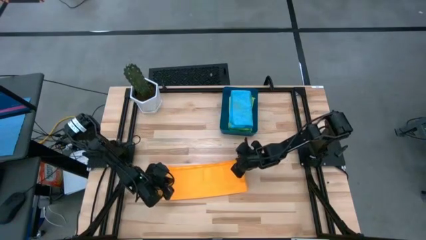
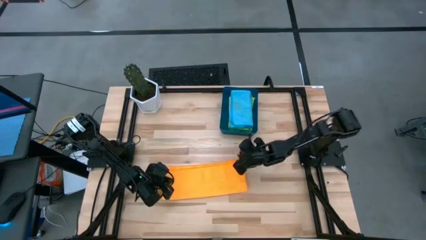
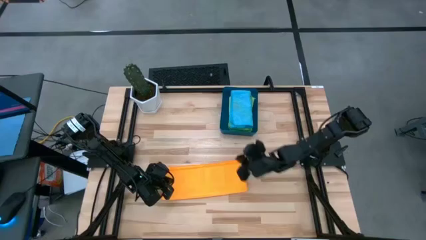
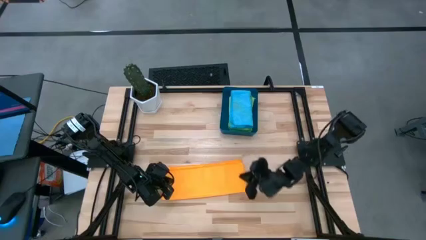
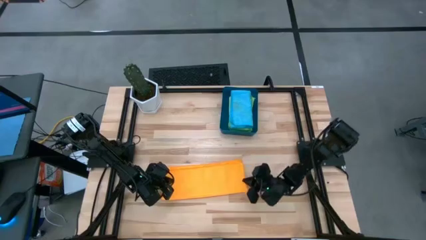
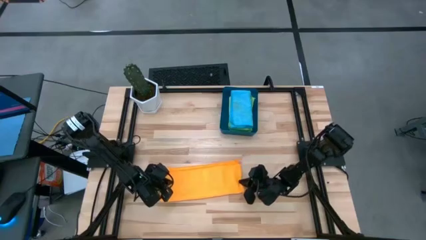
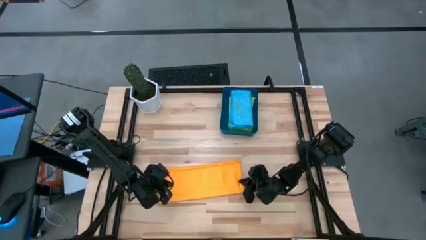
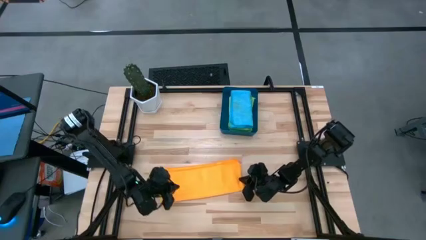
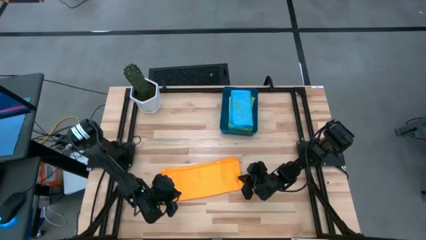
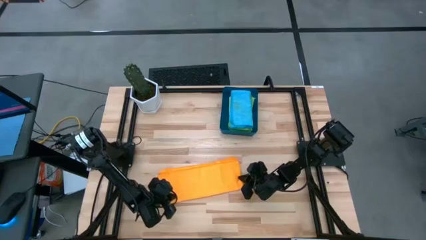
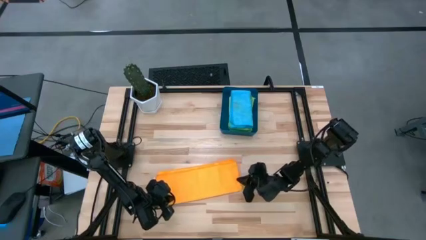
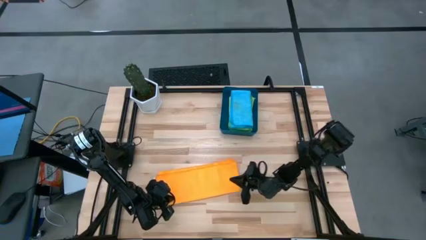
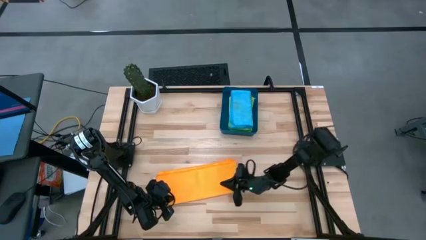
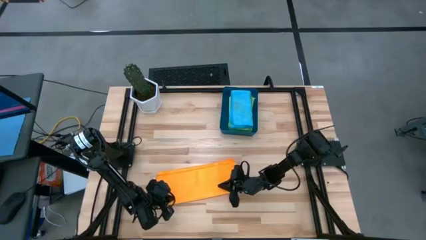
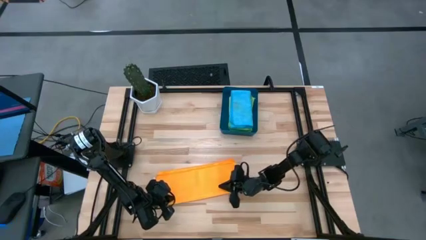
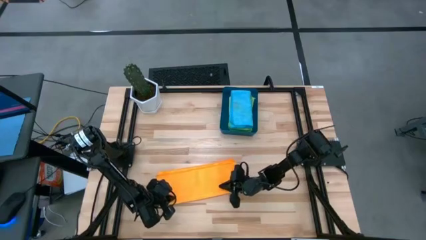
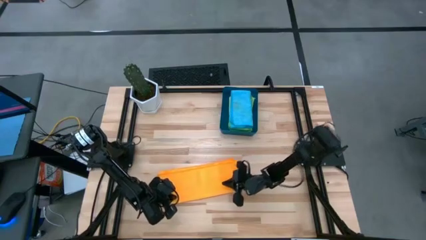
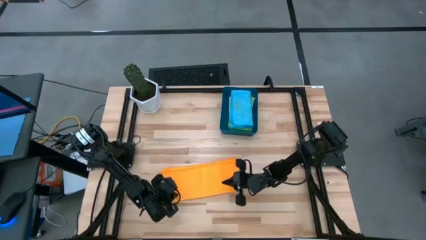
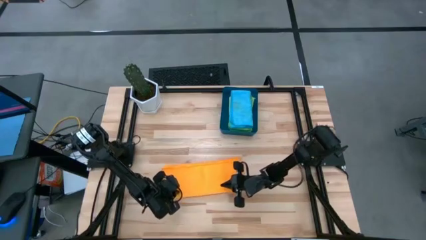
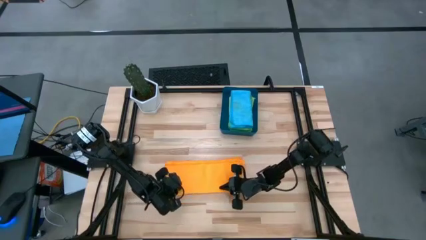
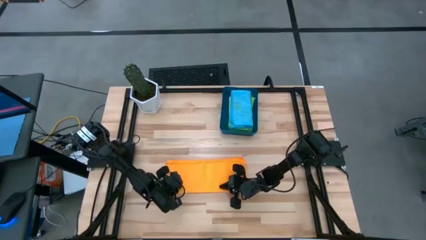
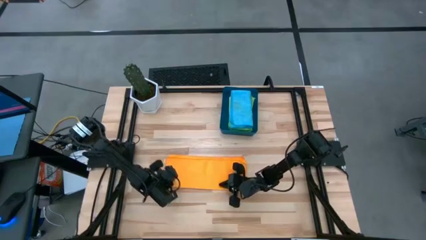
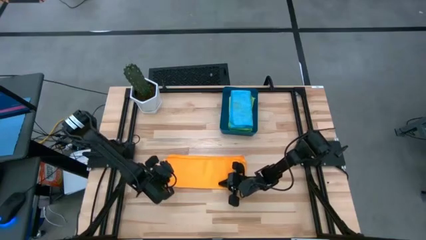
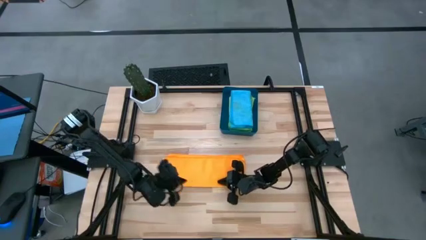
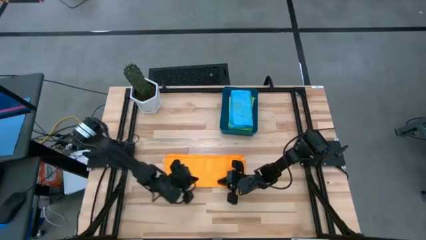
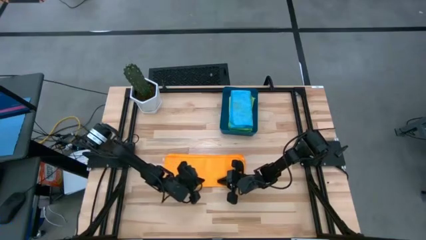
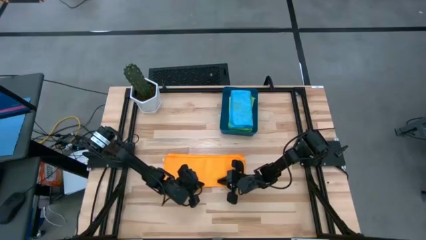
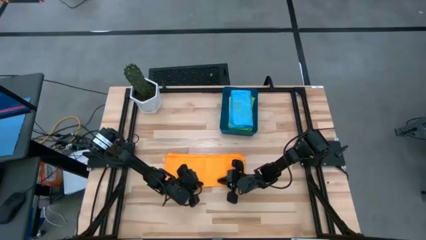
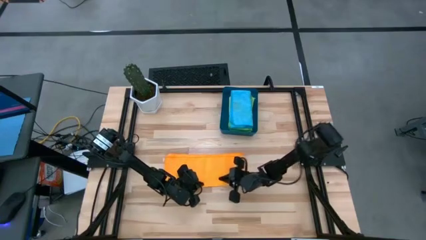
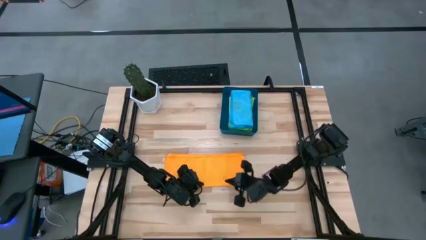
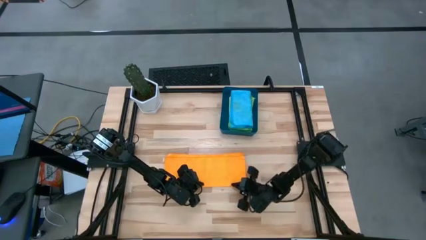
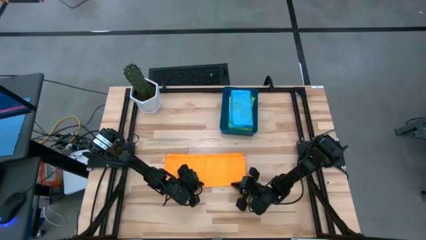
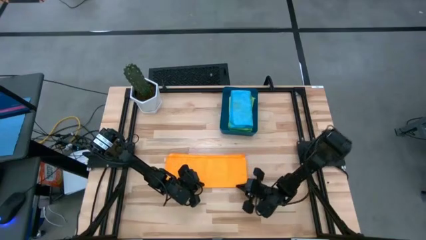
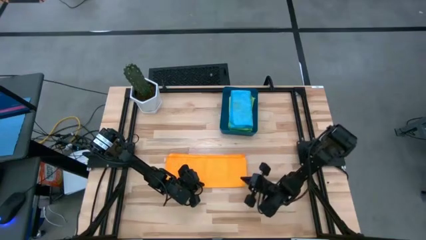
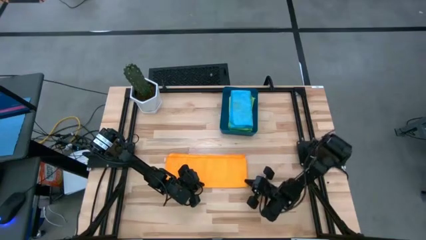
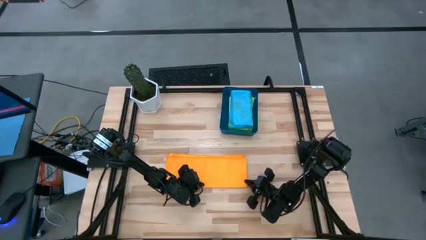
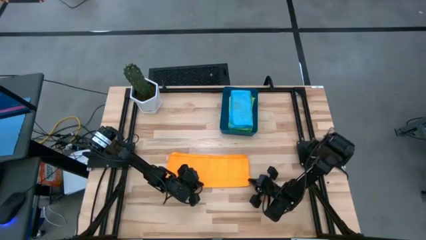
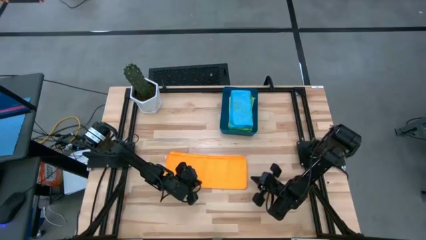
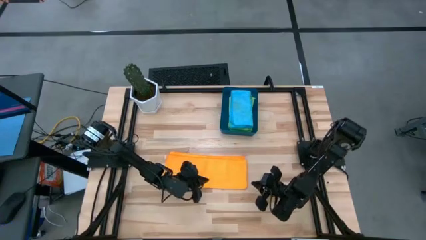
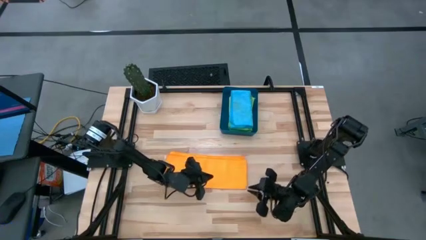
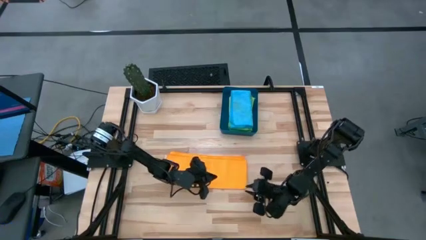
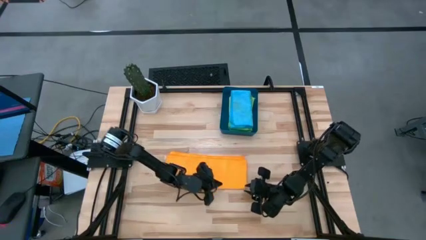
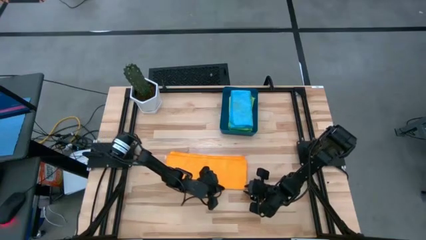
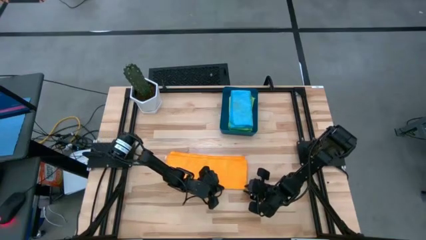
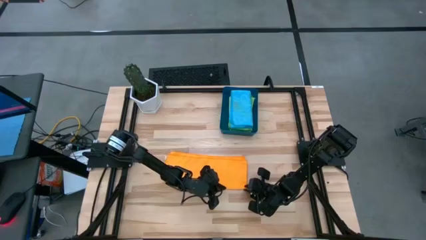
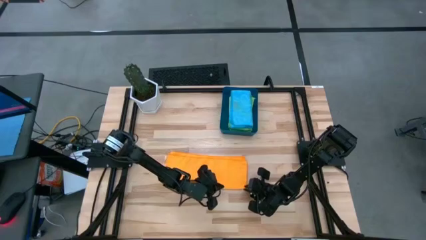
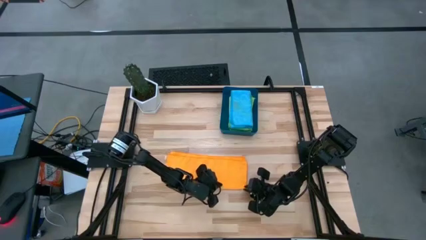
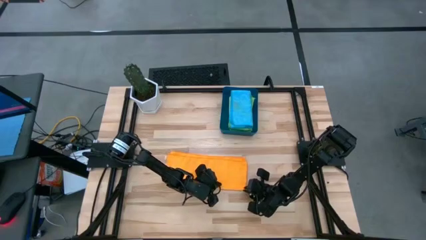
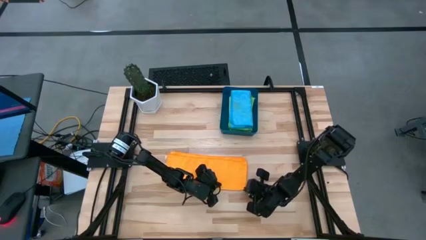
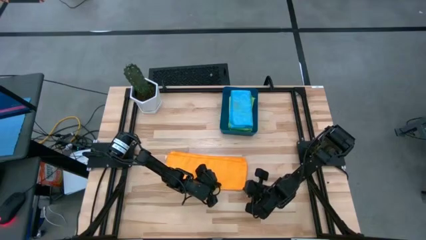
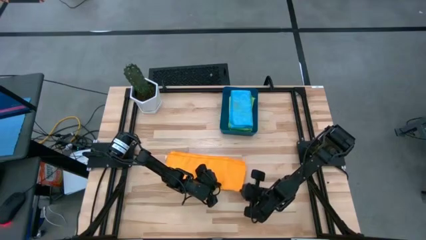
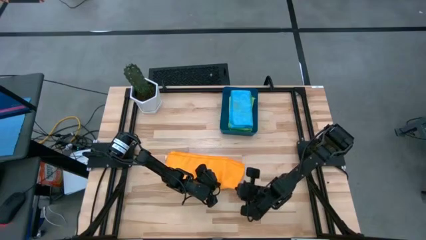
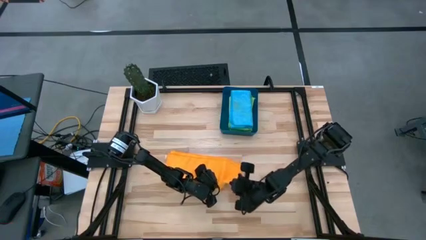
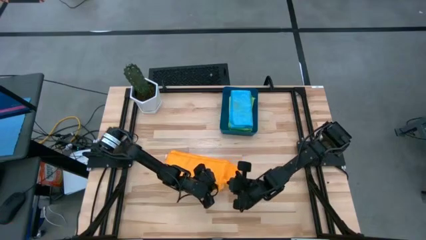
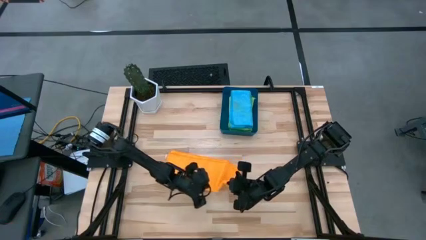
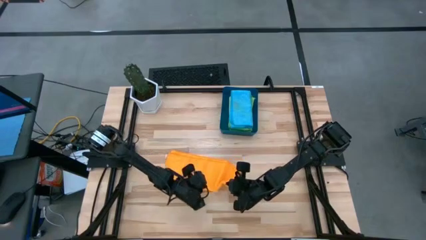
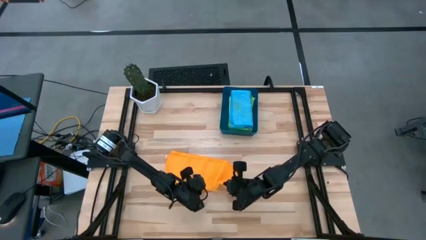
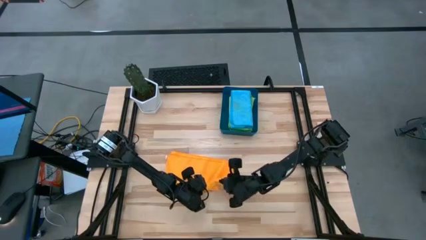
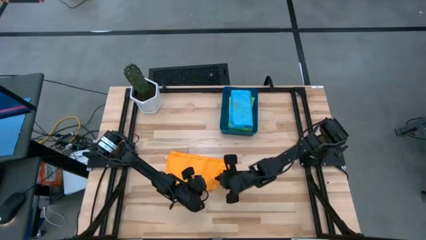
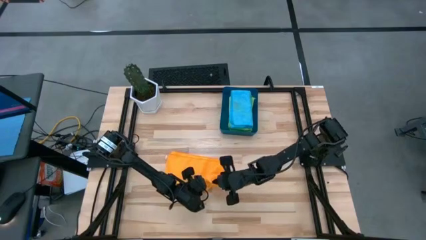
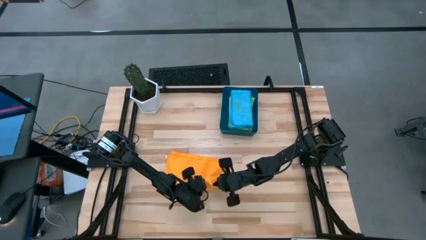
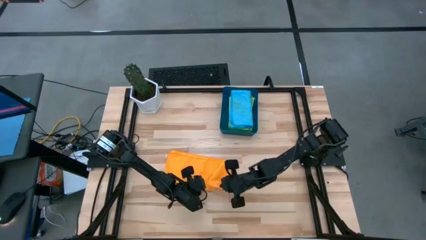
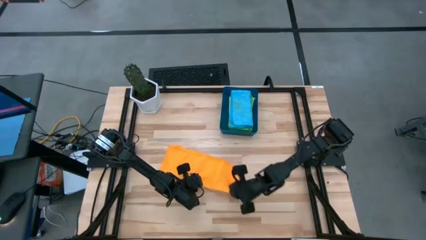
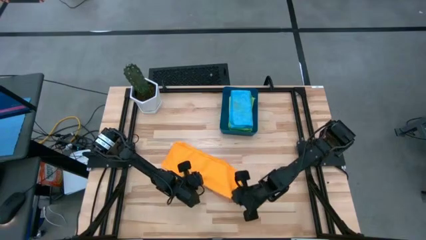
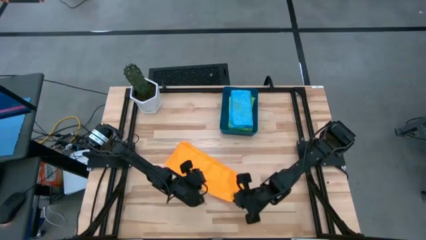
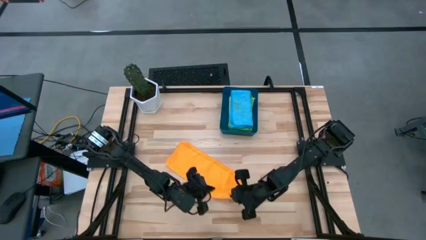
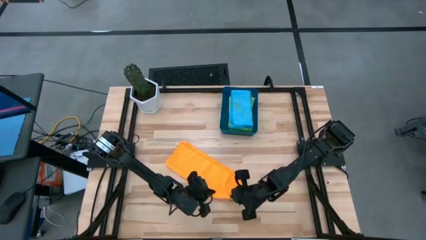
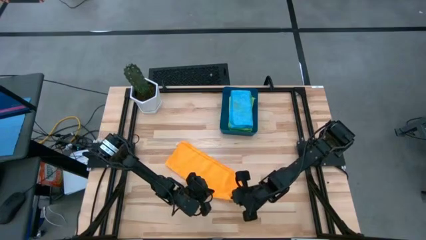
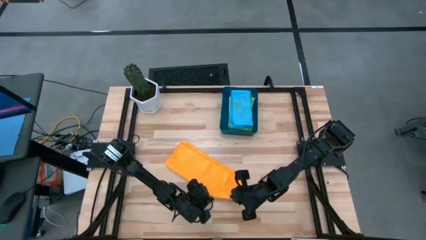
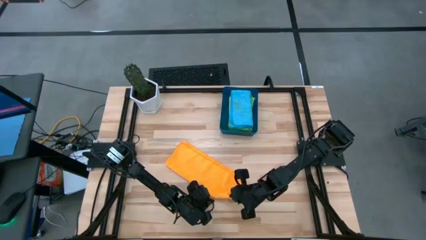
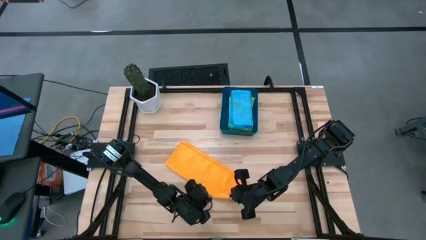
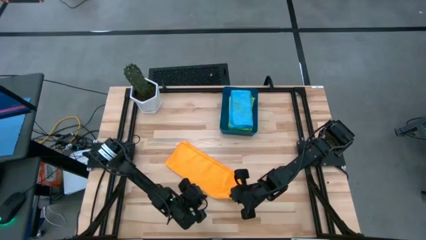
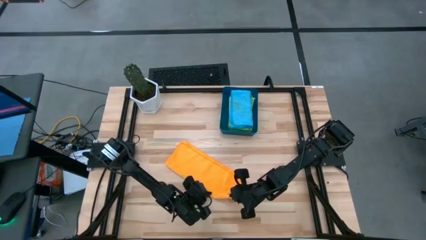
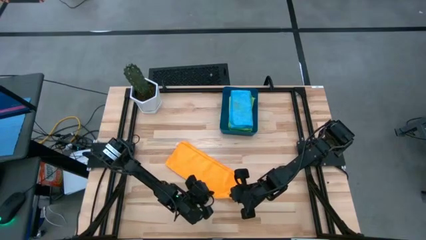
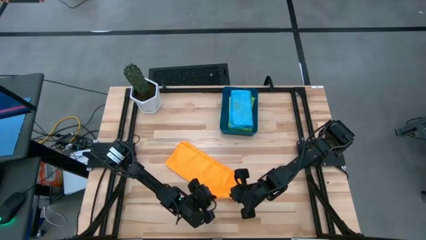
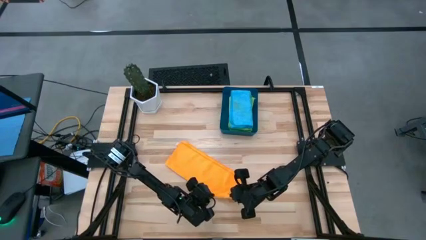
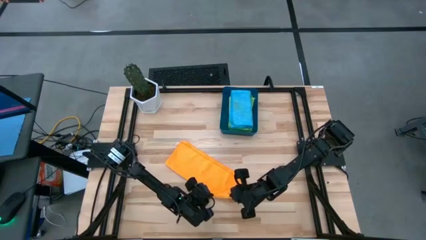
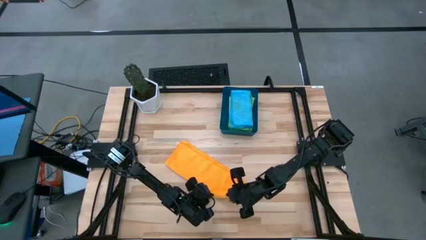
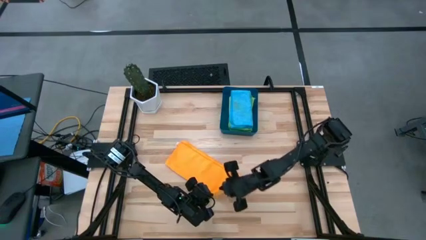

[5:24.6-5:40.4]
Task: Fold microfiber towels
Fold the orange towel
